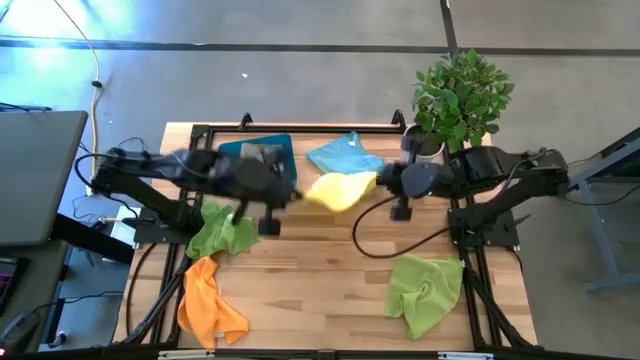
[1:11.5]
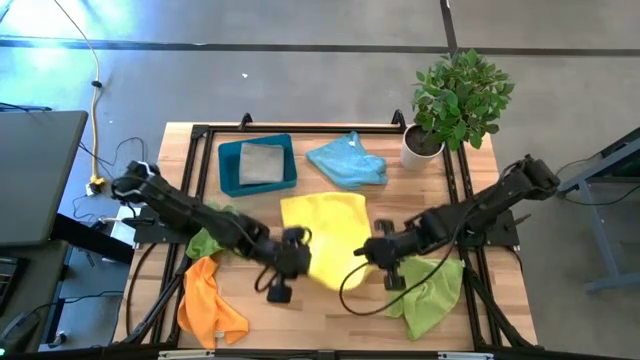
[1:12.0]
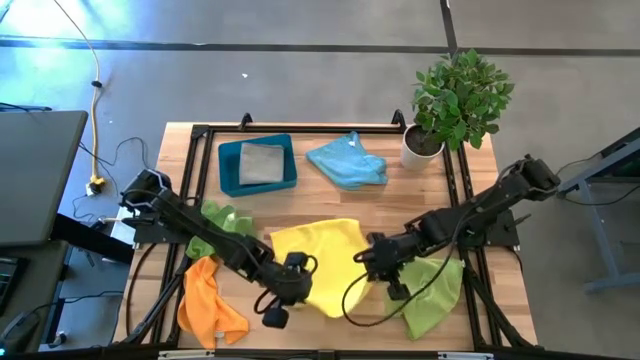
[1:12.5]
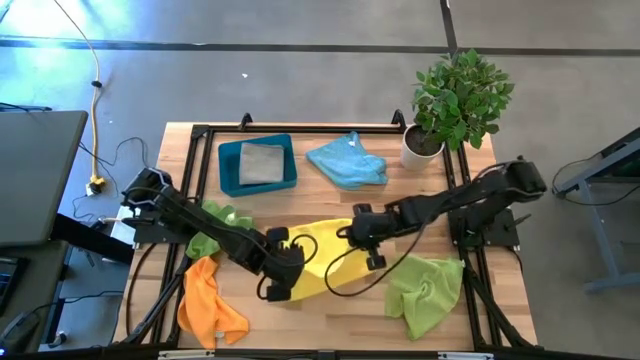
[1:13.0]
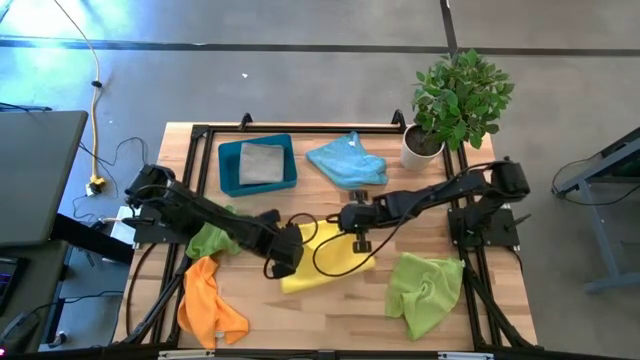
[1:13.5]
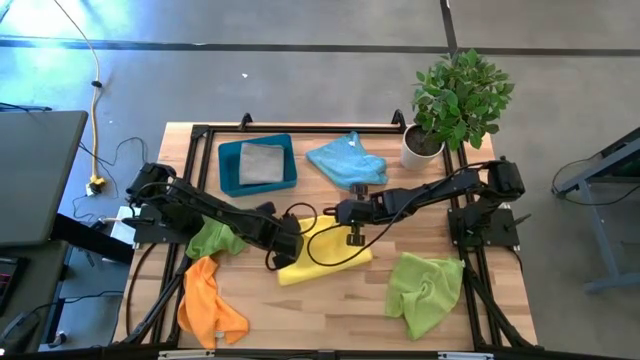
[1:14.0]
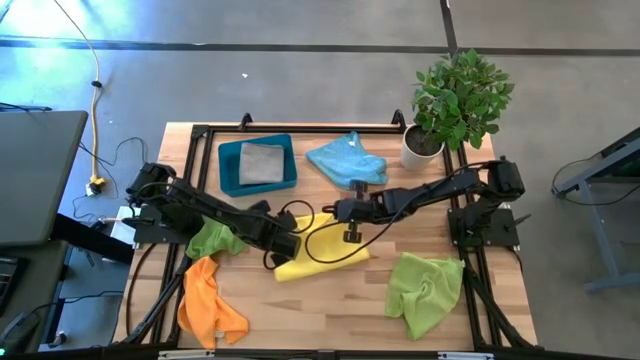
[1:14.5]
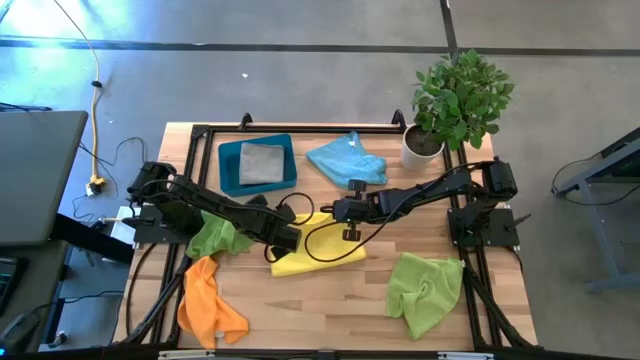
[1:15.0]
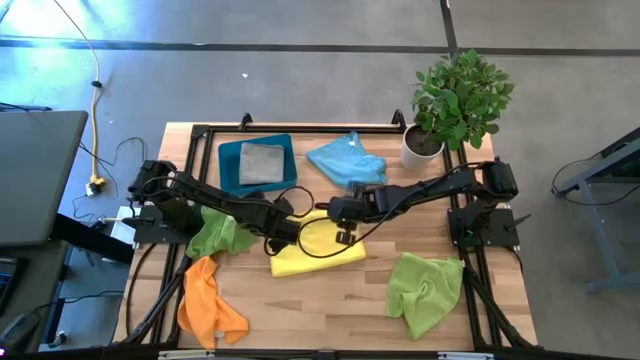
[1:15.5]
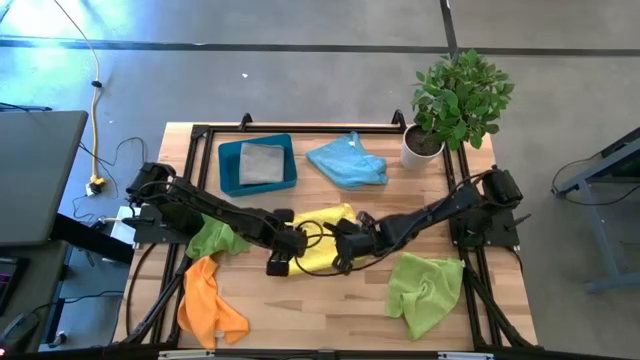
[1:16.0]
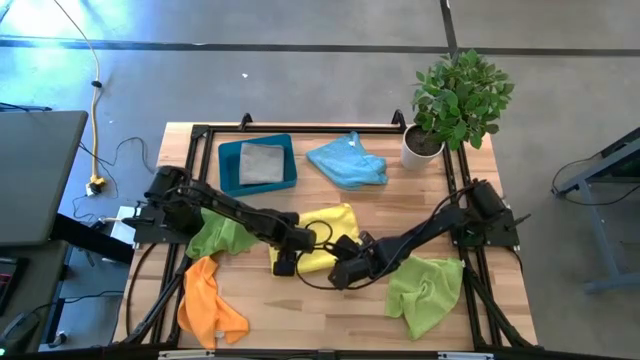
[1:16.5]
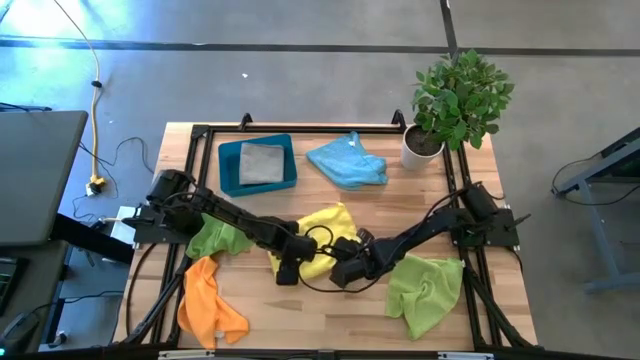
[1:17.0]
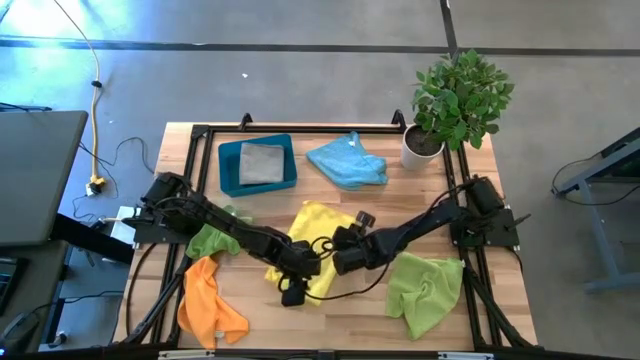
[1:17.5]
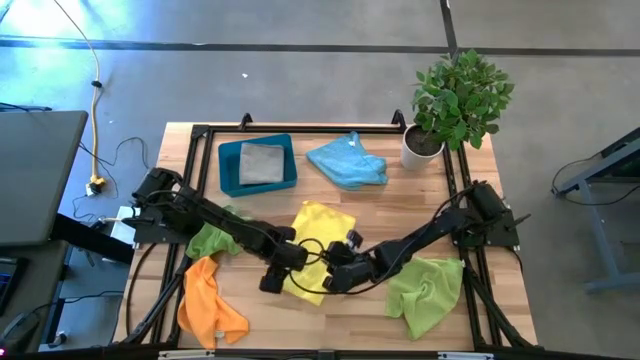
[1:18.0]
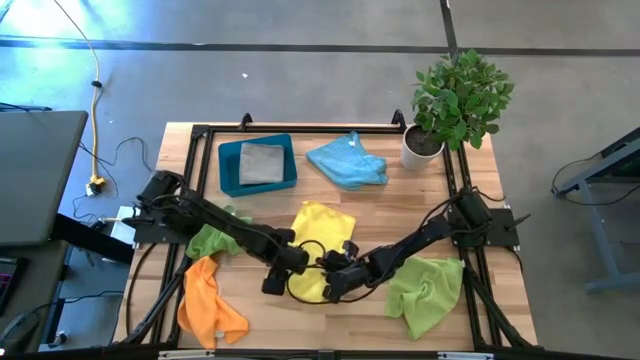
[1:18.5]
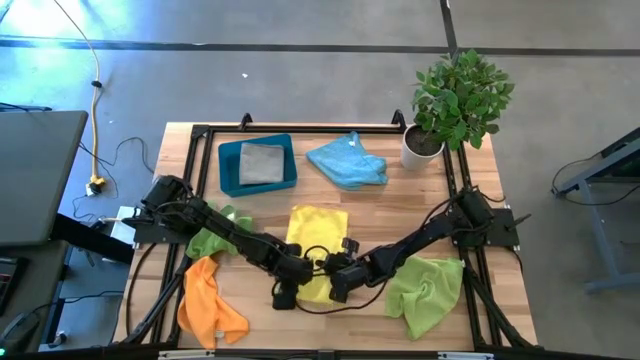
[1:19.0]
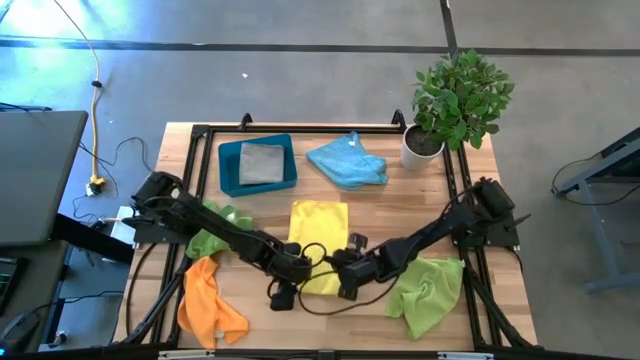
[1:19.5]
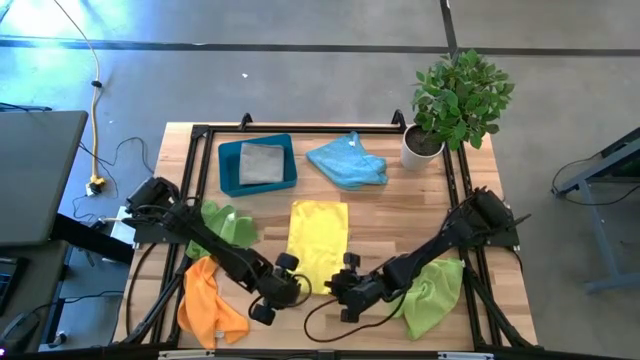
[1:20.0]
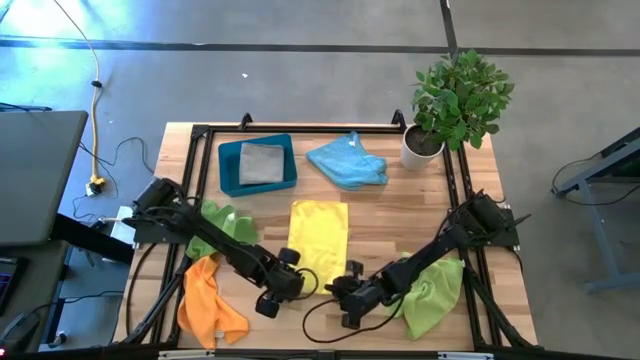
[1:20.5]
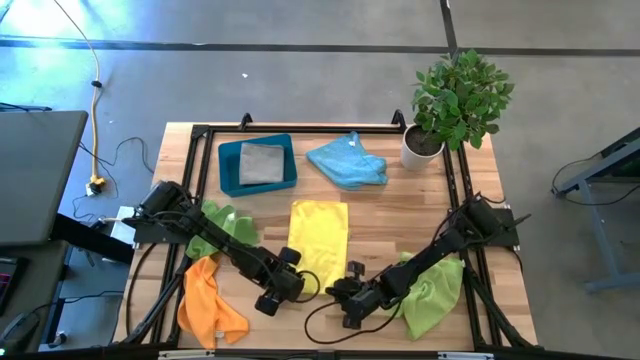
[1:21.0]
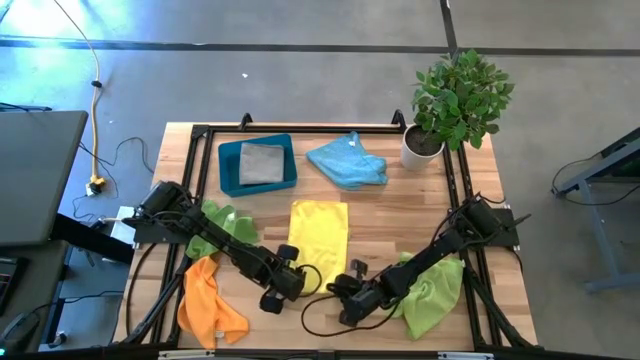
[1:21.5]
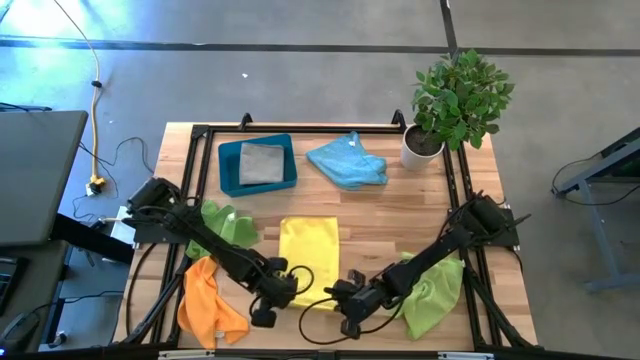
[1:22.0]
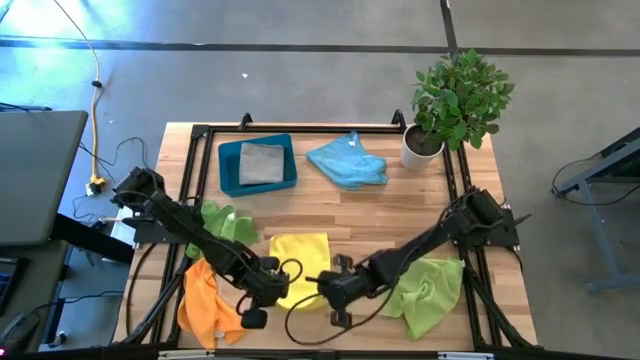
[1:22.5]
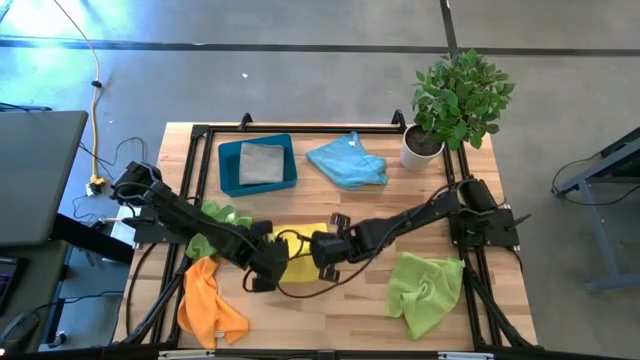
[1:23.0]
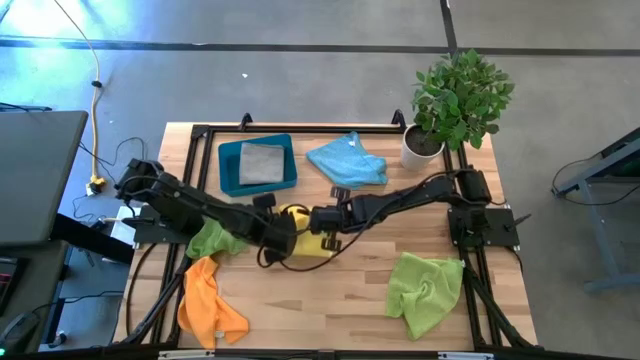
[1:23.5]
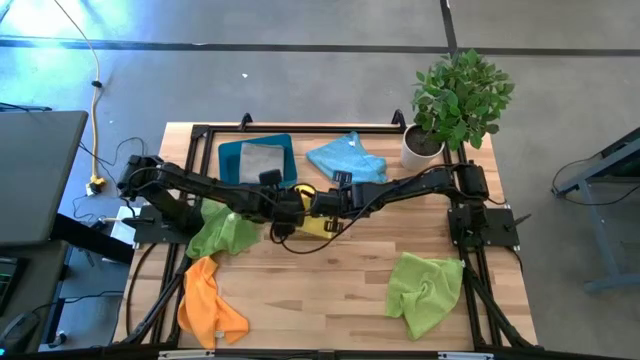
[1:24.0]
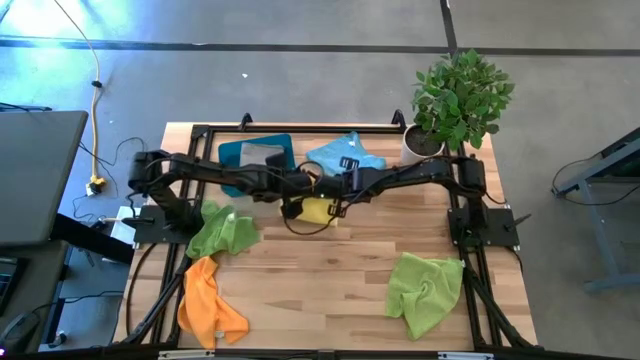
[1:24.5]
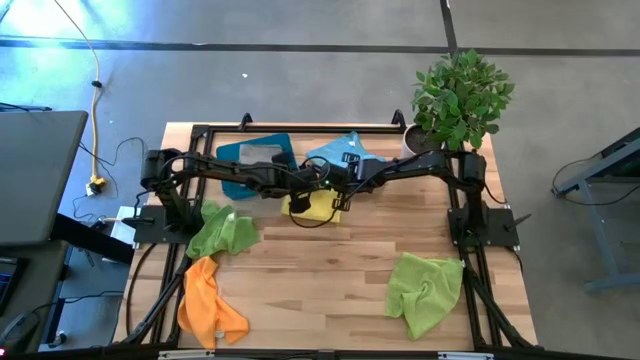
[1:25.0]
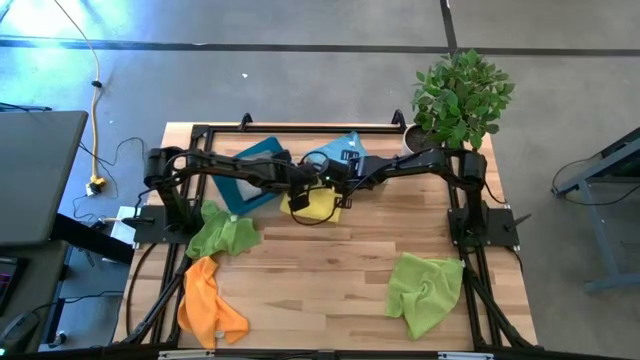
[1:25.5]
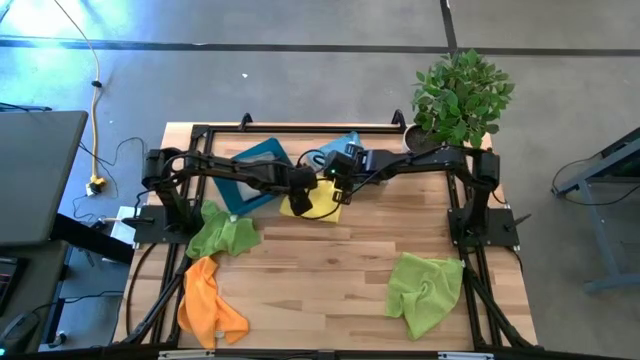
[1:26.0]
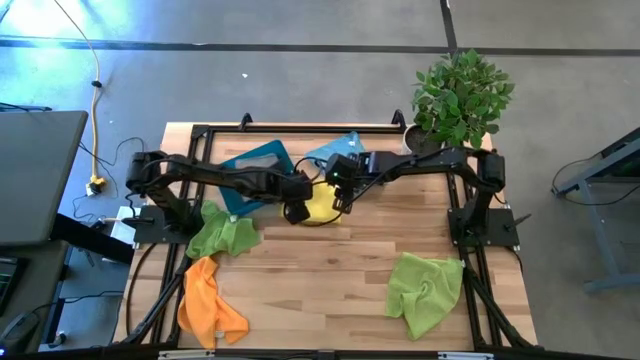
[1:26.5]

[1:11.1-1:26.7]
Task: Fold microfiber towels
Fold the yellow microfiber cloth

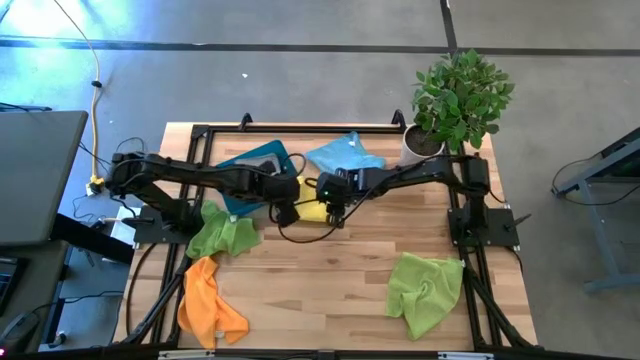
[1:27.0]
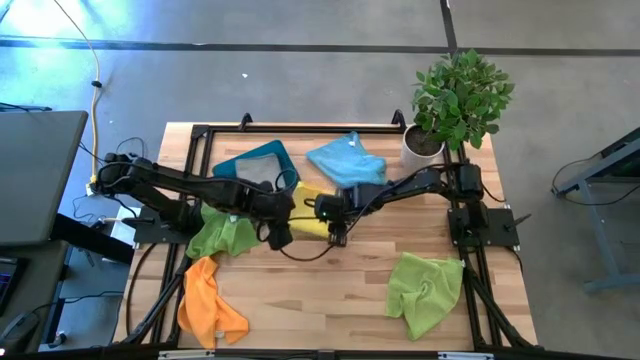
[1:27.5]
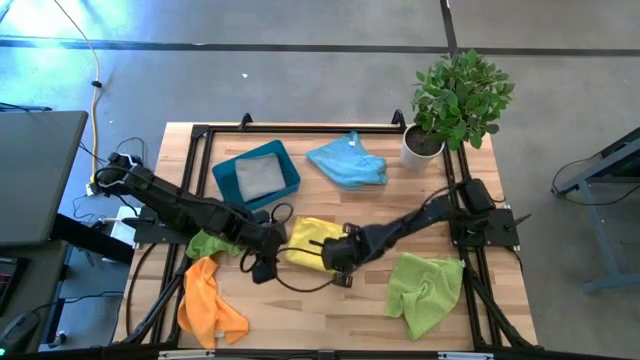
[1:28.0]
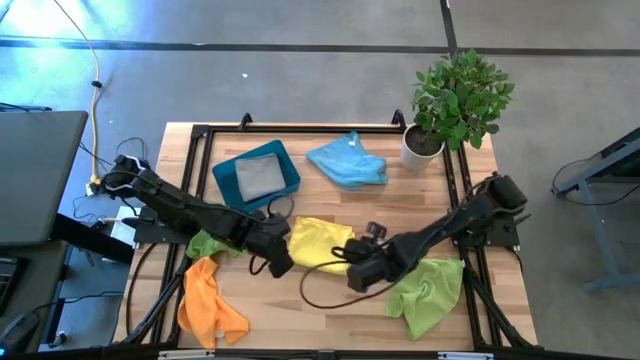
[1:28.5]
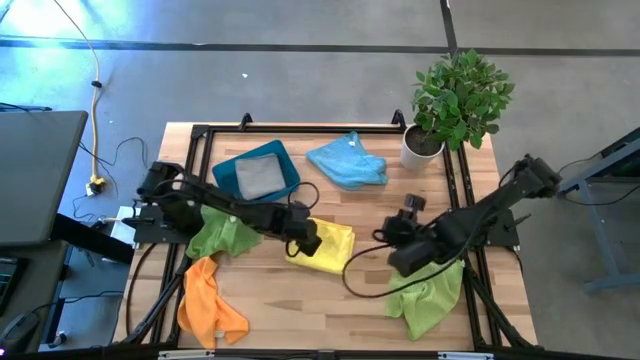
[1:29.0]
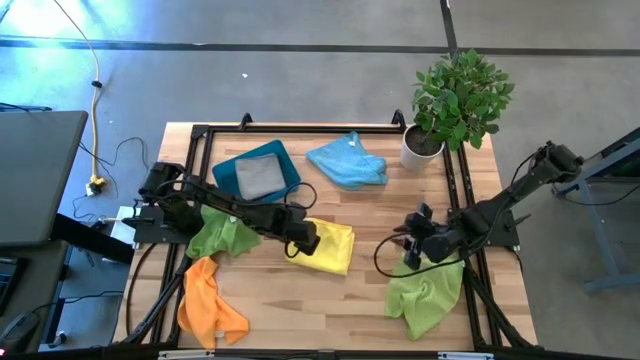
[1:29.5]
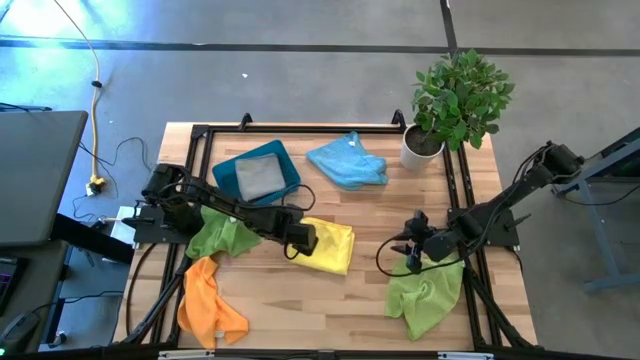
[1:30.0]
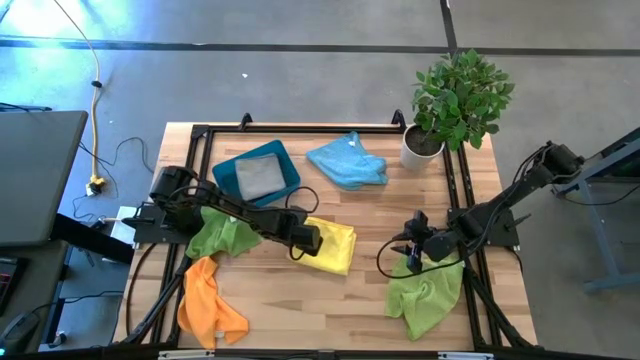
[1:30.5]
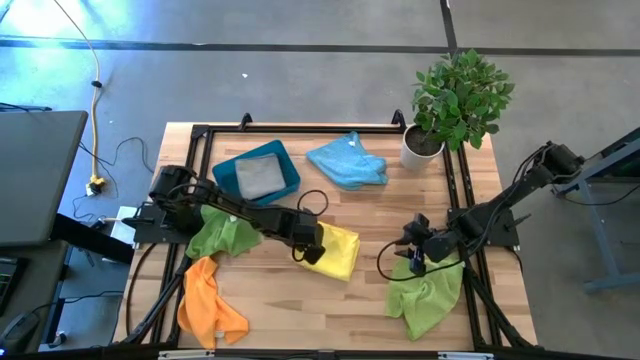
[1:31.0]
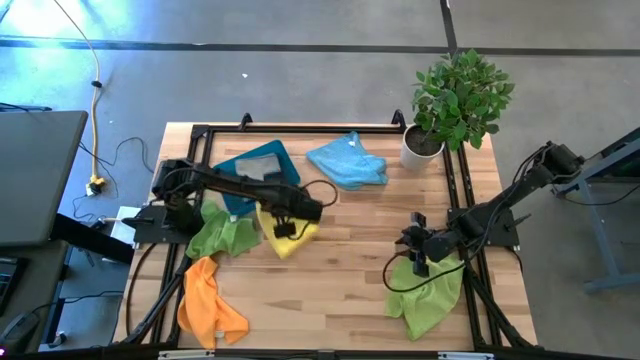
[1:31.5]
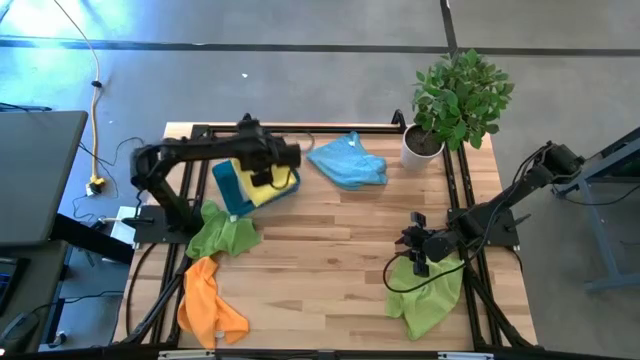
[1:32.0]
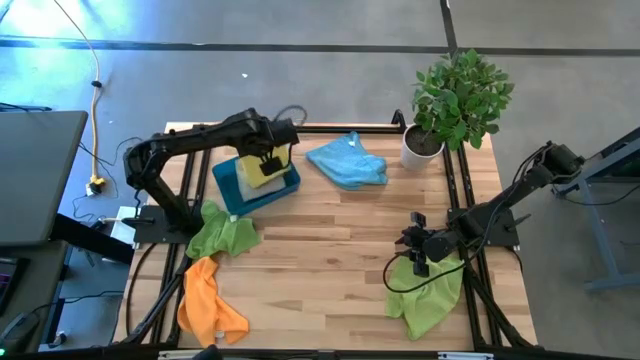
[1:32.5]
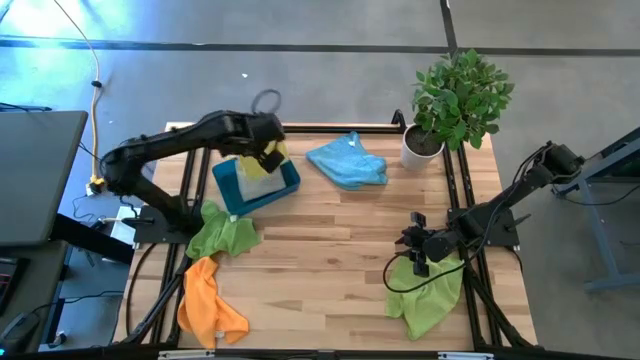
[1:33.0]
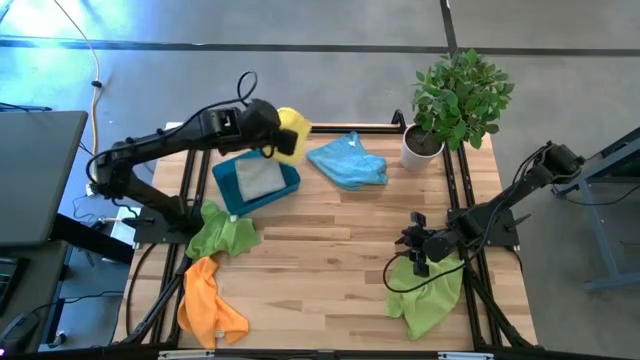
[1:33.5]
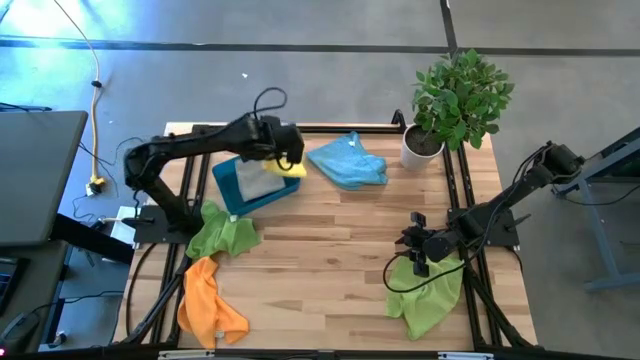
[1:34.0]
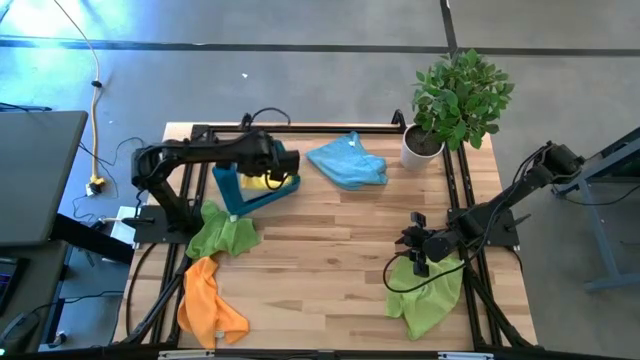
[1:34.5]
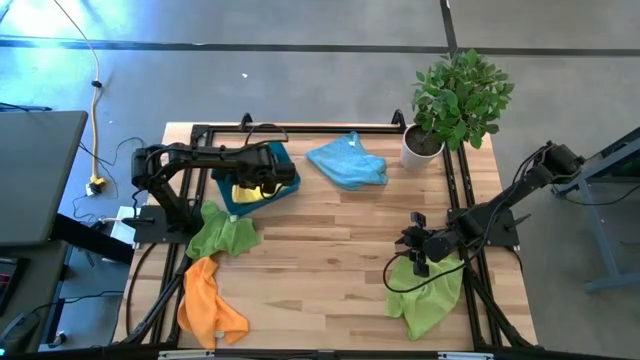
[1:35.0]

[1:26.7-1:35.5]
Put the folded yellow microfiber cloth into the bin
